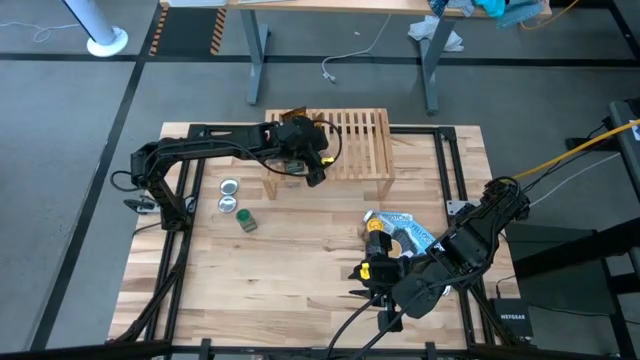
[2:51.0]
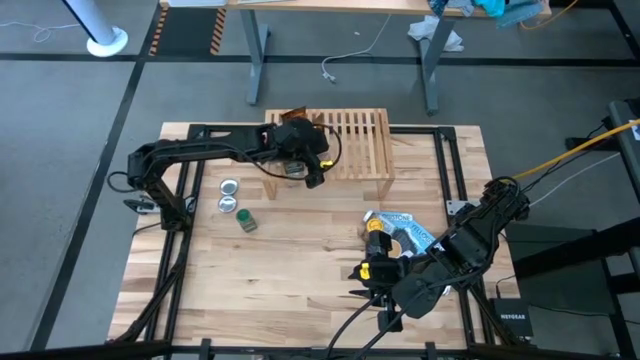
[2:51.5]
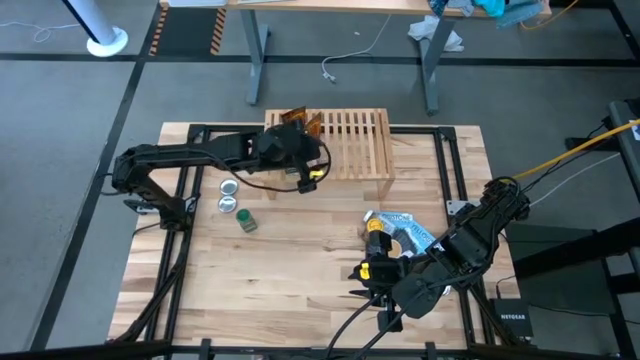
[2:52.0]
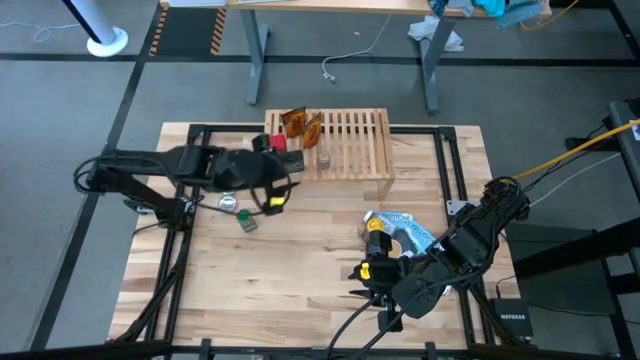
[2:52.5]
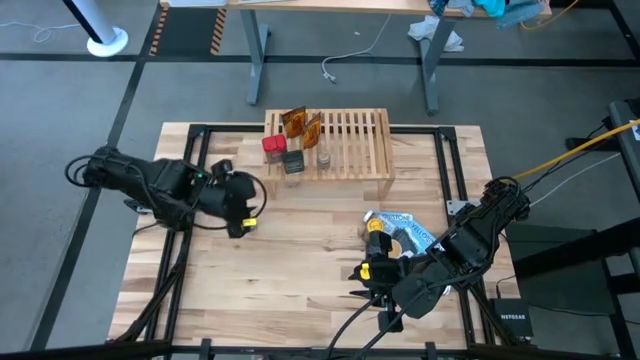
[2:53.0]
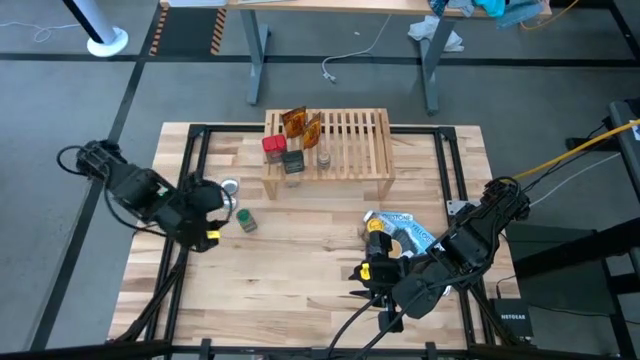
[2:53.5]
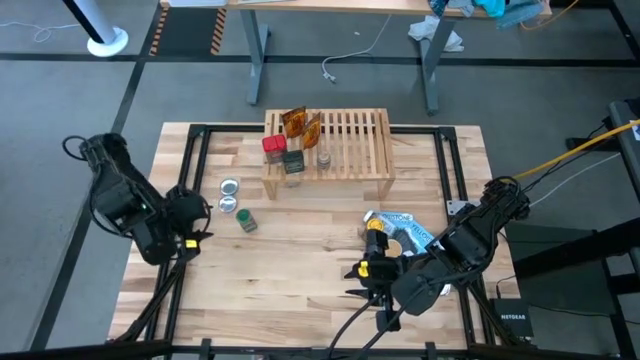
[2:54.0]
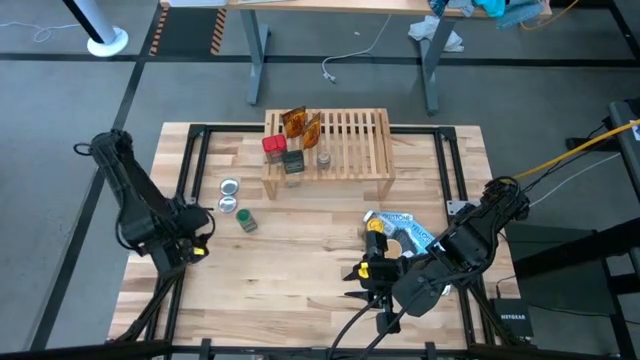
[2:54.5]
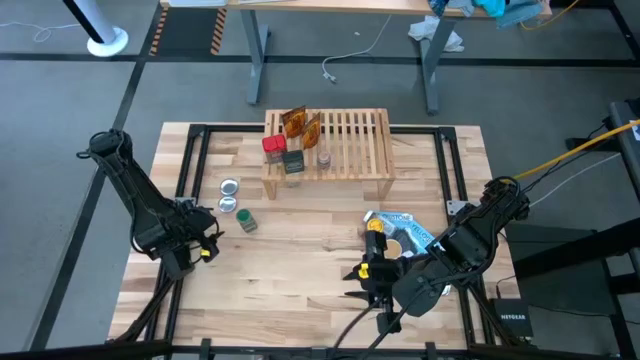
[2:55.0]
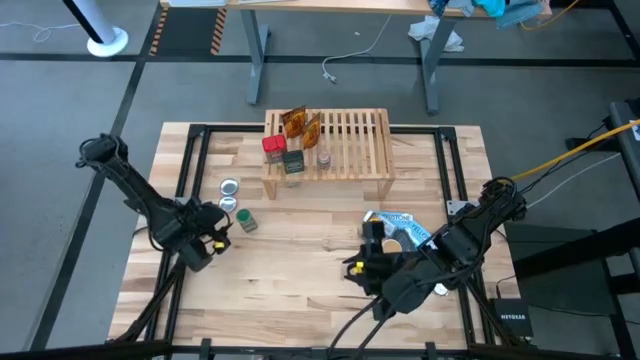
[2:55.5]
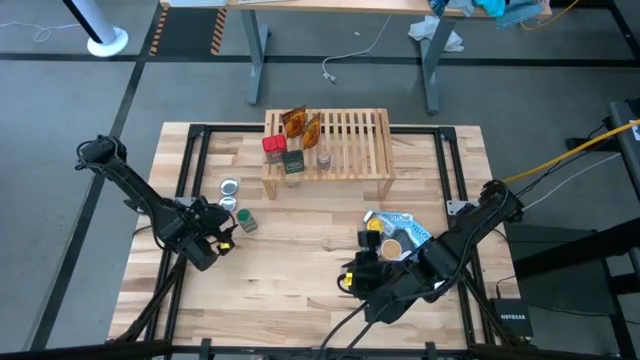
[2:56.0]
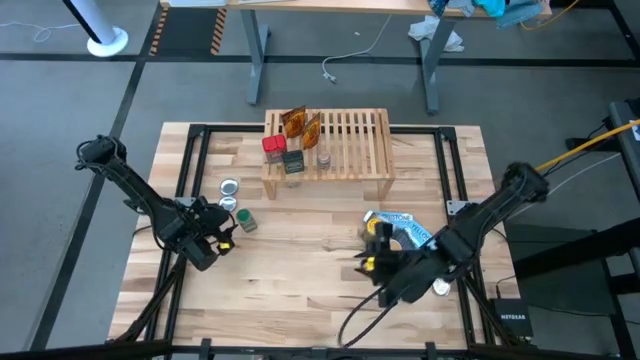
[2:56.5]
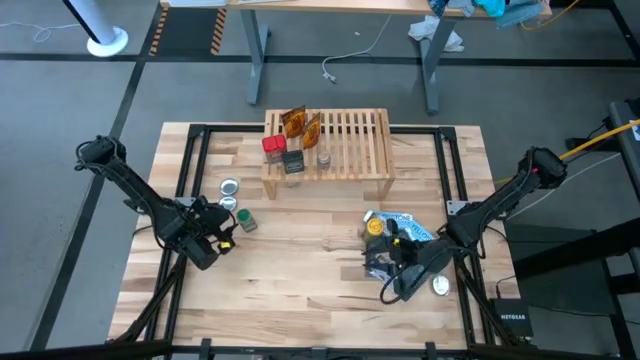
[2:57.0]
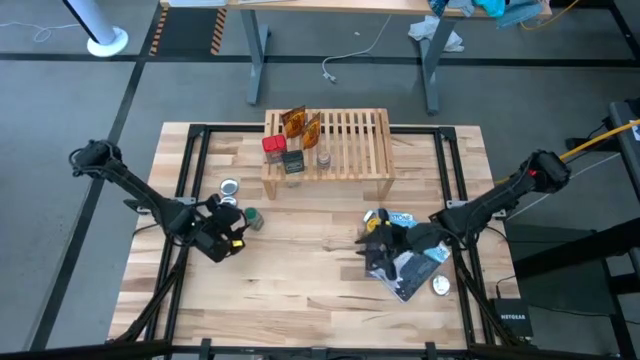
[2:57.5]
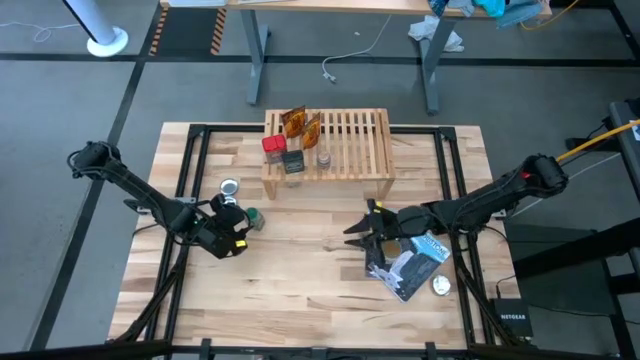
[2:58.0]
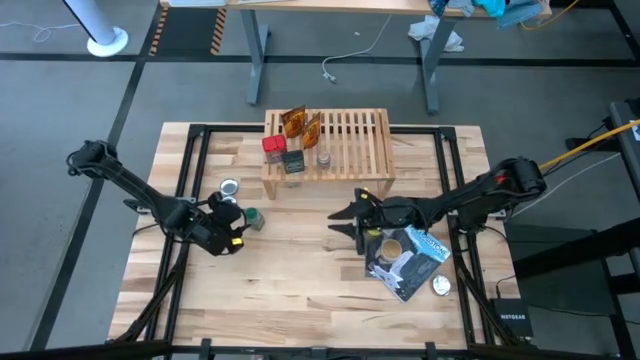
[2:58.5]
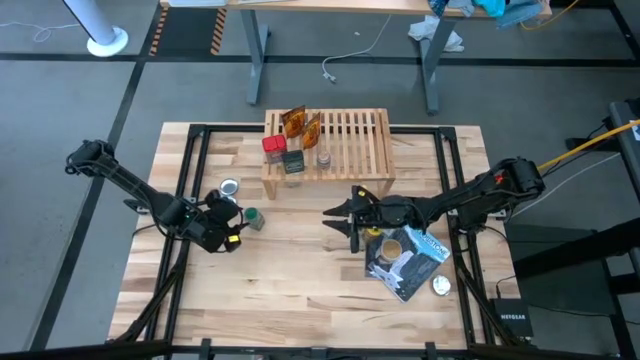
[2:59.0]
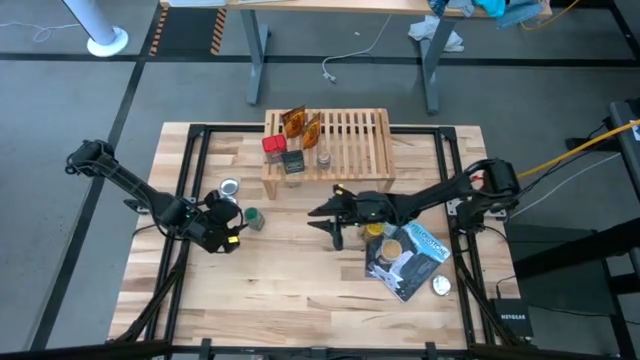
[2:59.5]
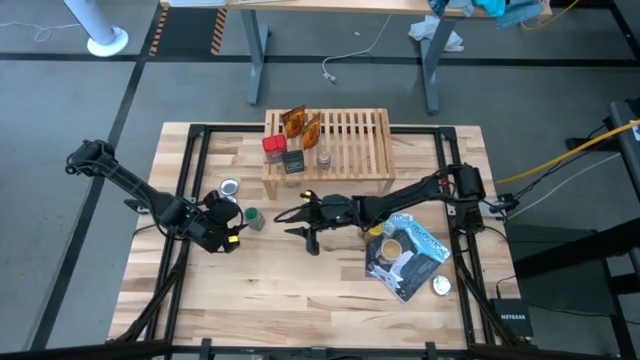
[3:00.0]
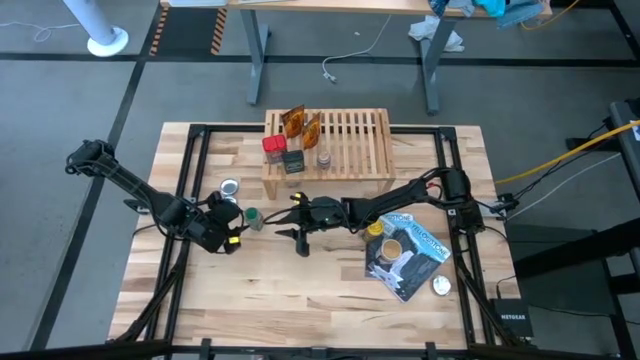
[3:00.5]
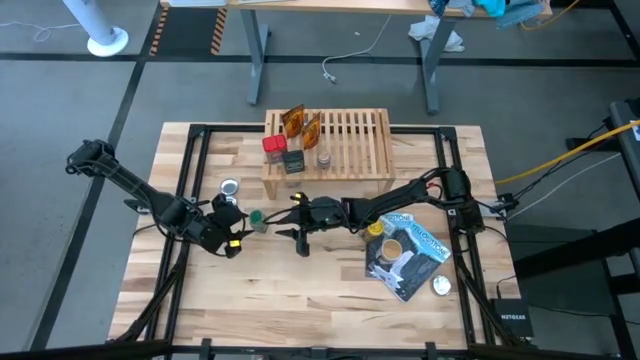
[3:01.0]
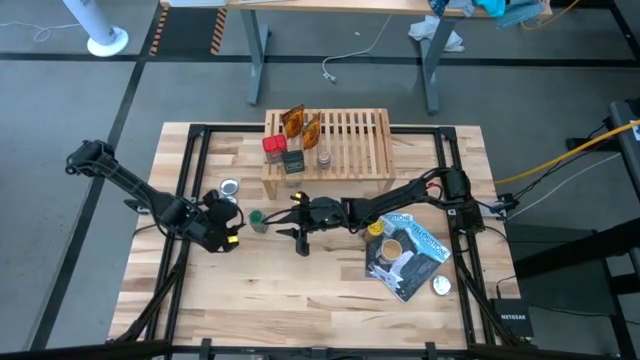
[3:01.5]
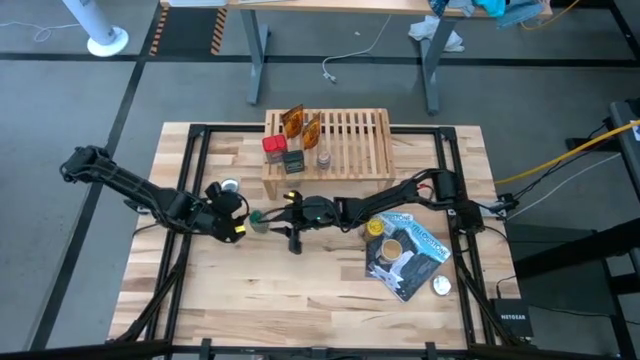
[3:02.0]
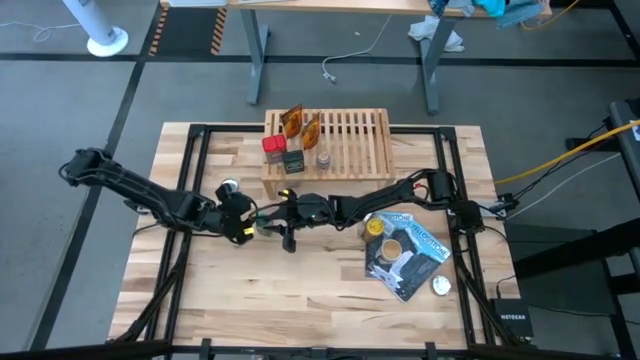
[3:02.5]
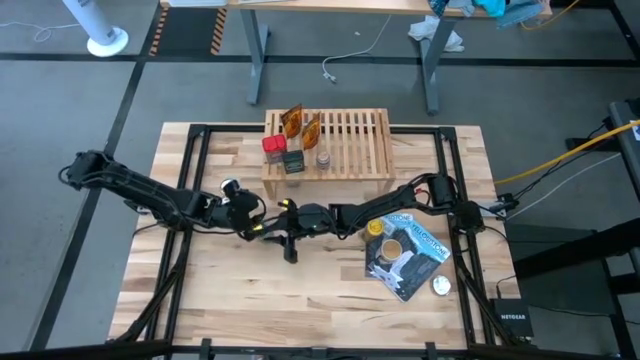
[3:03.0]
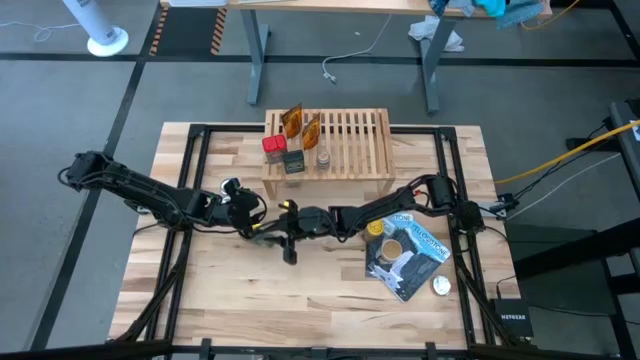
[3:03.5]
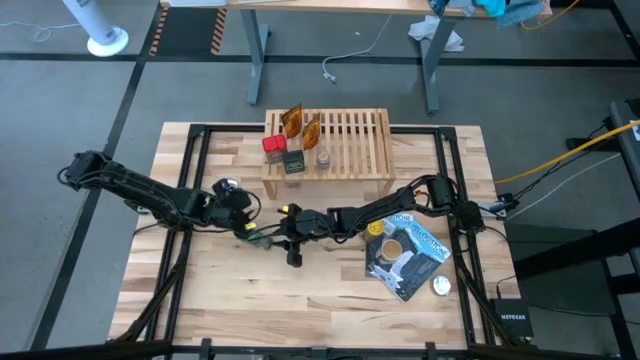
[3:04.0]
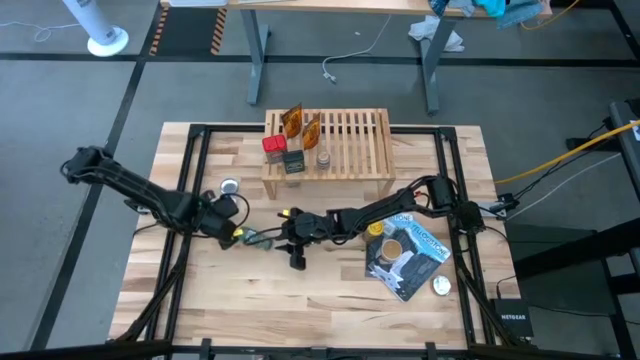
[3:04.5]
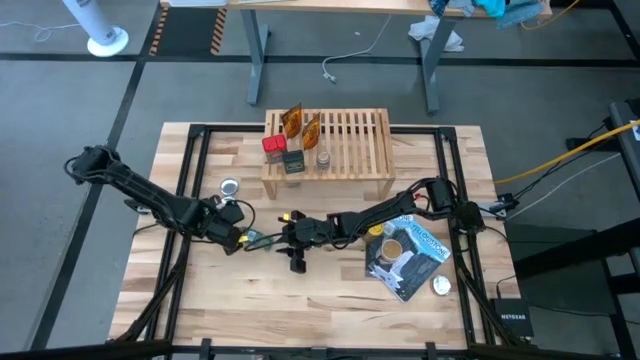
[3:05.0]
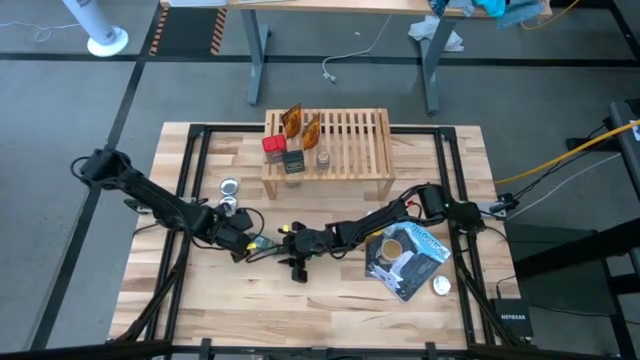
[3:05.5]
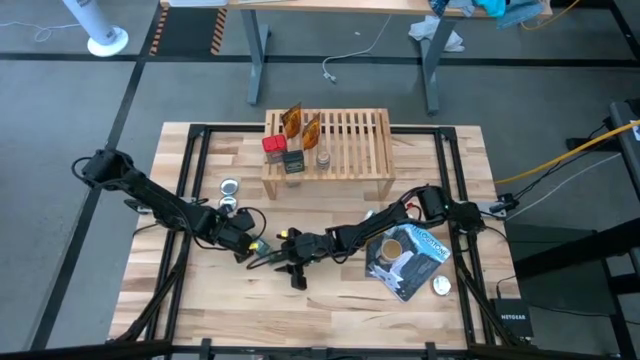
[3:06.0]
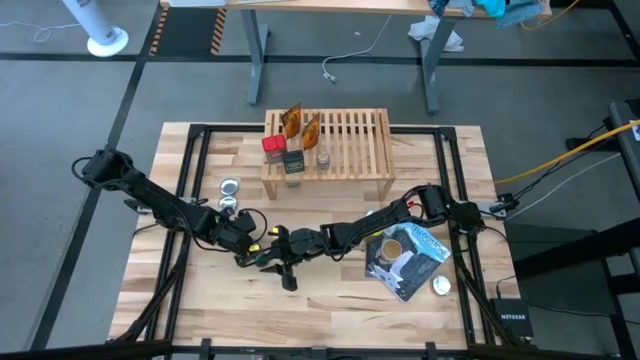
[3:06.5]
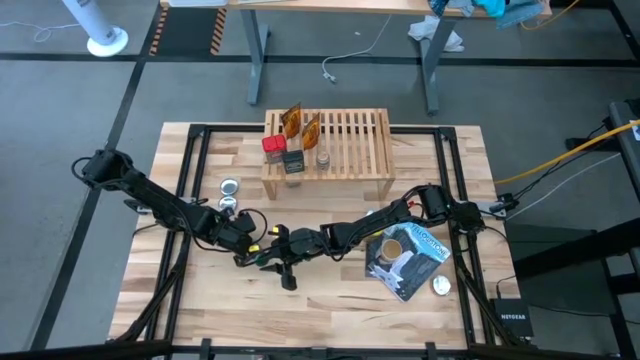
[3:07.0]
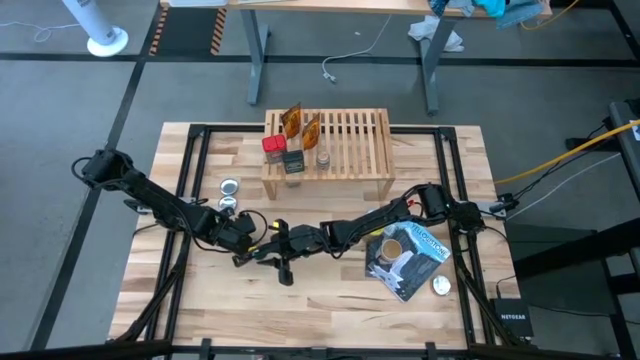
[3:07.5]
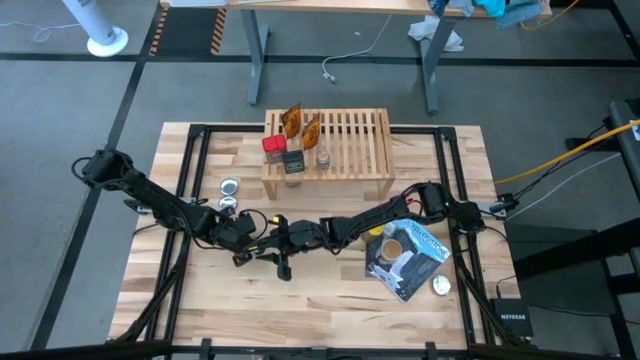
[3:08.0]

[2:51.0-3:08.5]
Task: Shelf spices
Put the green seasoning bottle on the shelf

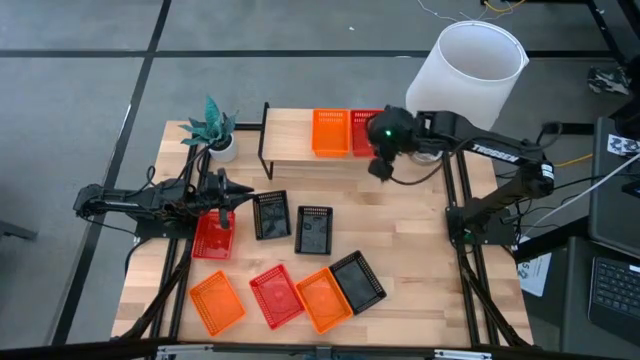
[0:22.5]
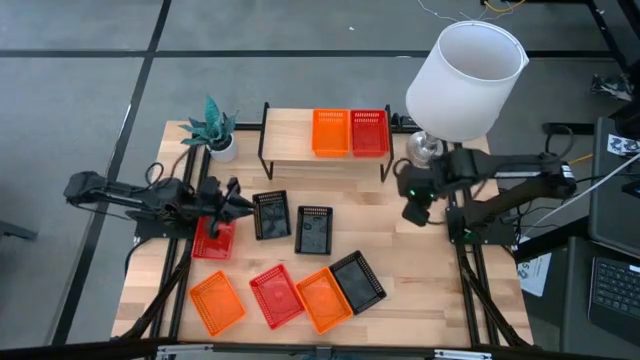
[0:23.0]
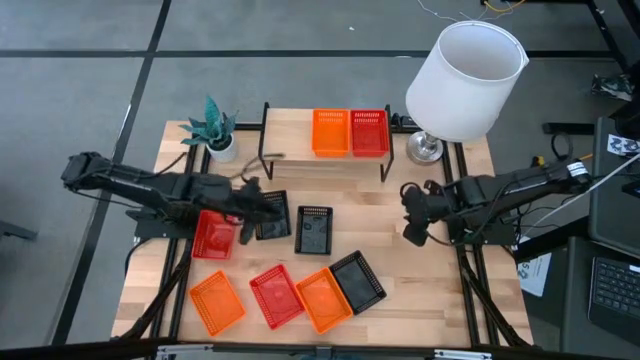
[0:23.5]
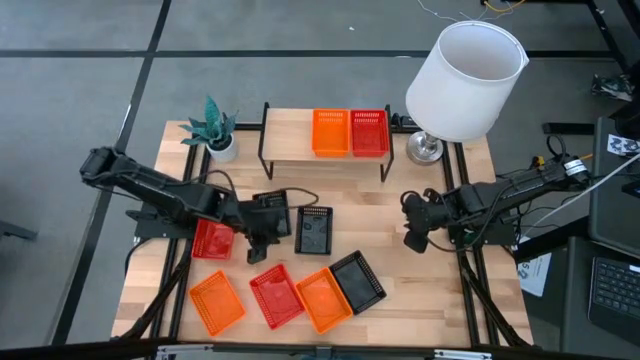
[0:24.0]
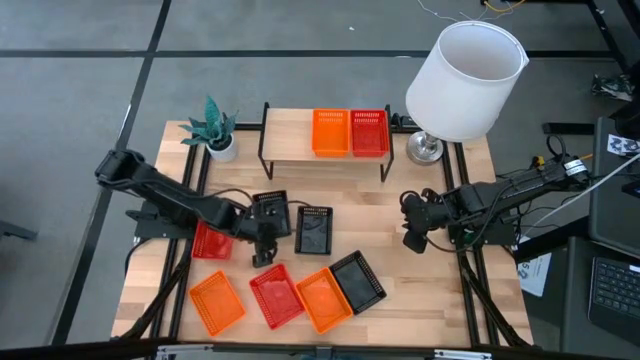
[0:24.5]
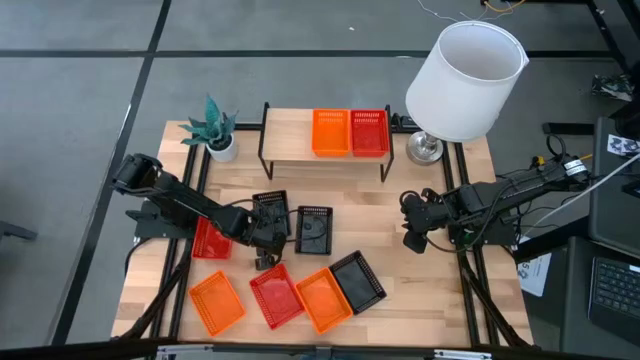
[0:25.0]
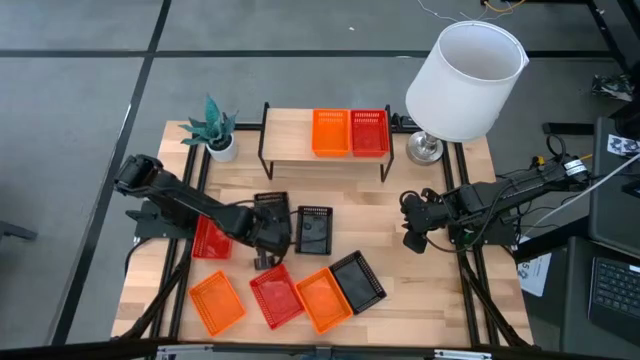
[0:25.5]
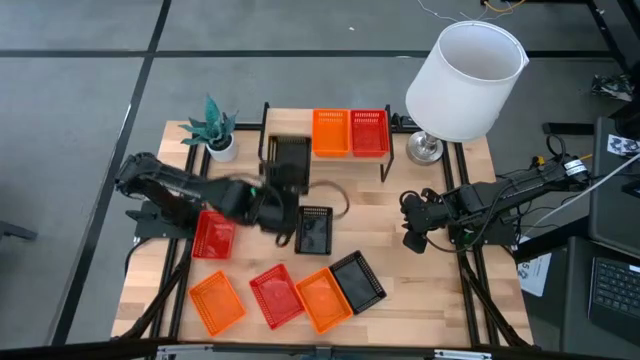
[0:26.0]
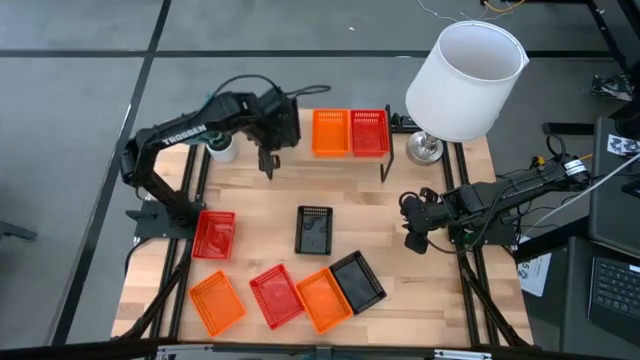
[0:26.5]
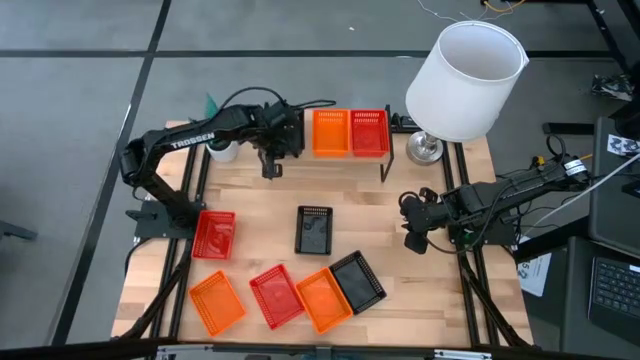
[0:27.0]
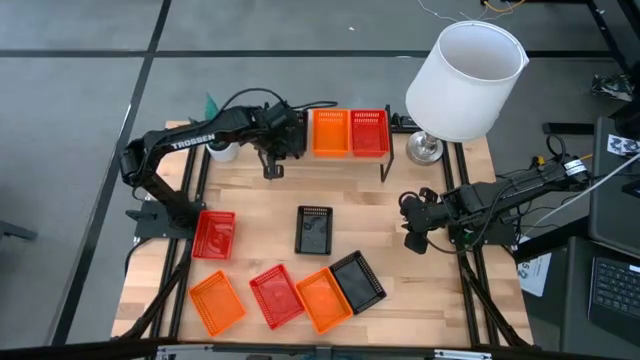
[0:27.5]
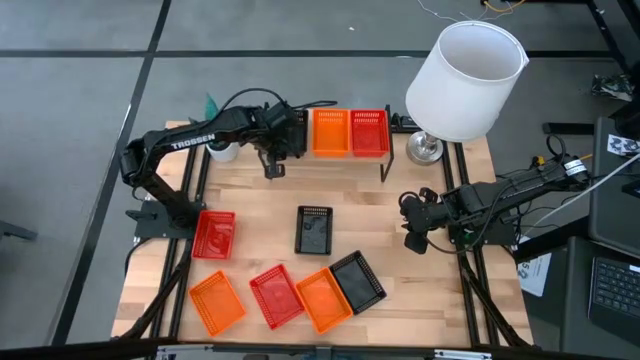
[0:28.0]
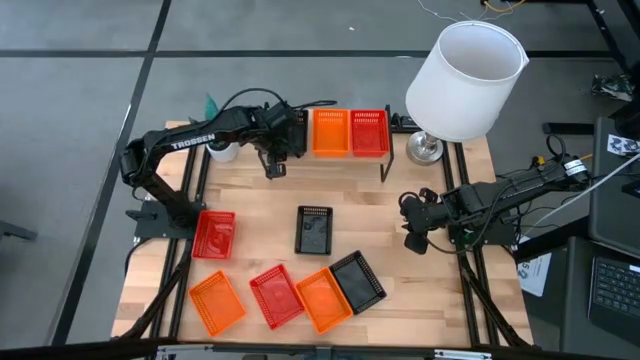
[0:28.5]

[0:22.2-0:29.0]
Task: Stack baskets on shelf by color
Put the top left black bin on the shelf
